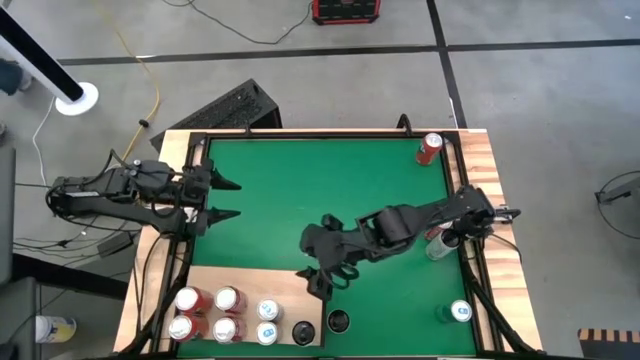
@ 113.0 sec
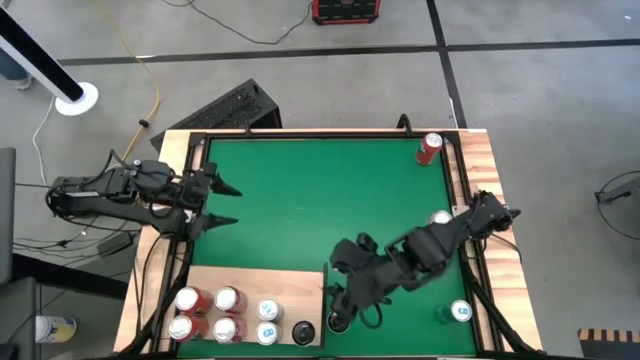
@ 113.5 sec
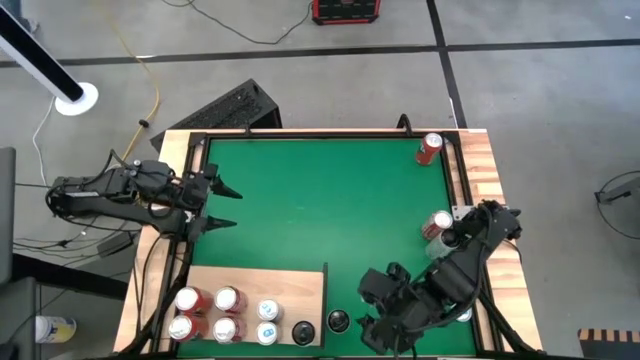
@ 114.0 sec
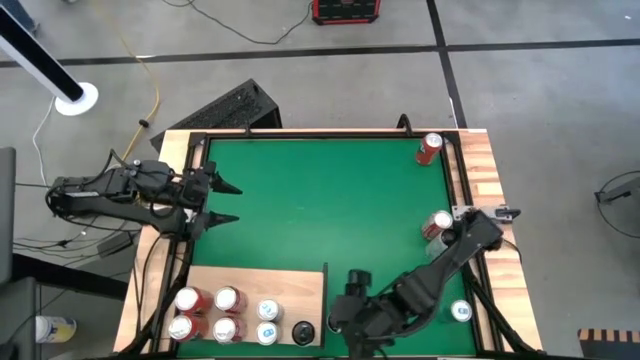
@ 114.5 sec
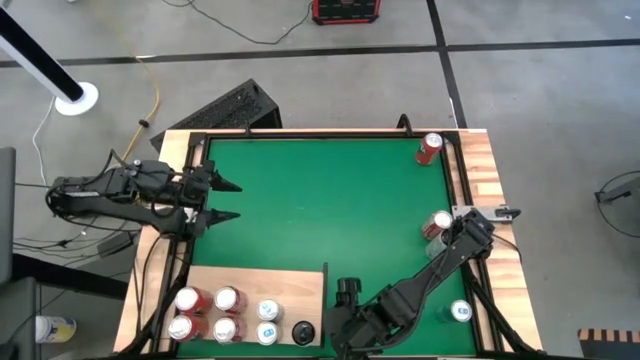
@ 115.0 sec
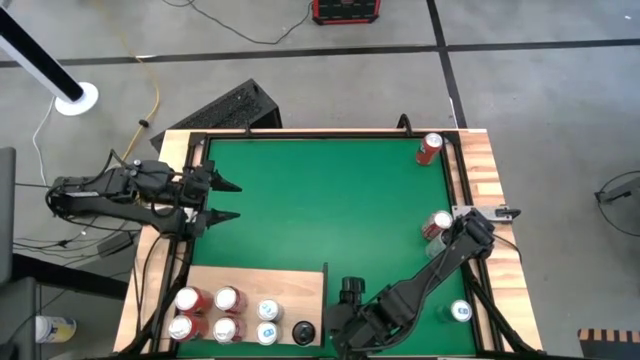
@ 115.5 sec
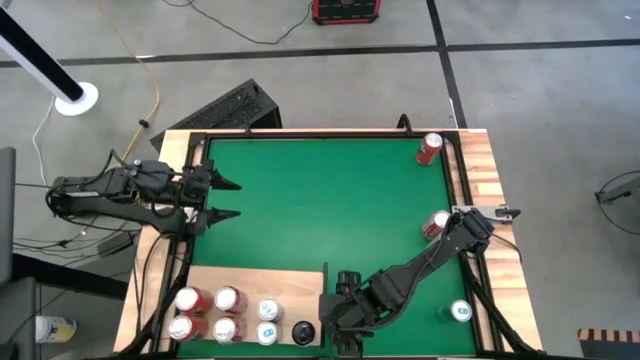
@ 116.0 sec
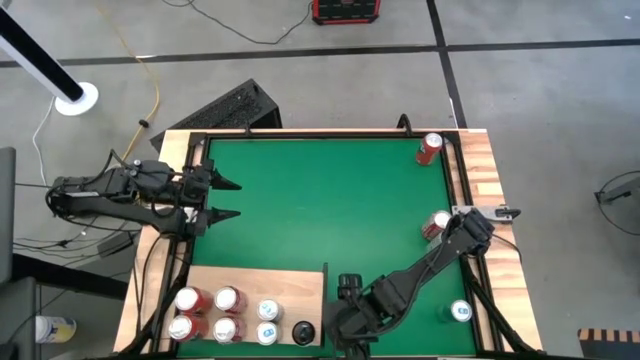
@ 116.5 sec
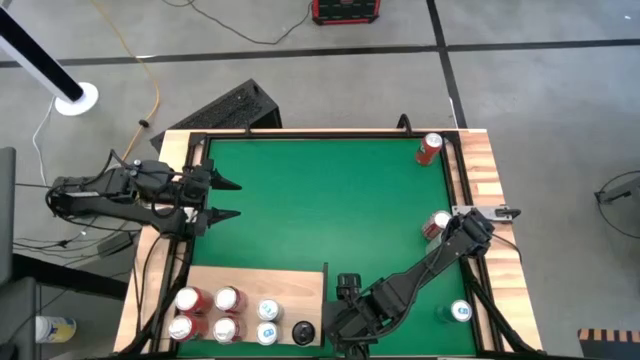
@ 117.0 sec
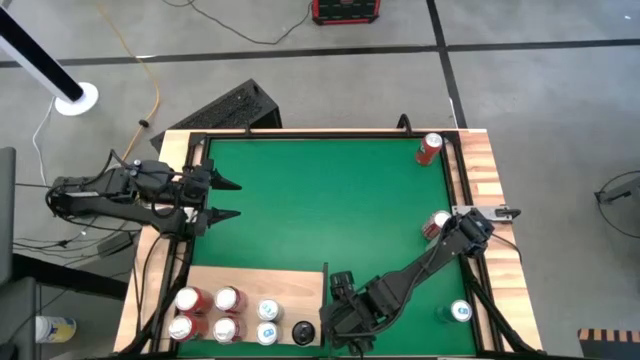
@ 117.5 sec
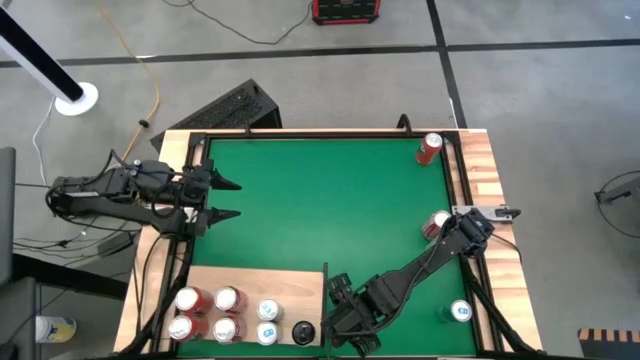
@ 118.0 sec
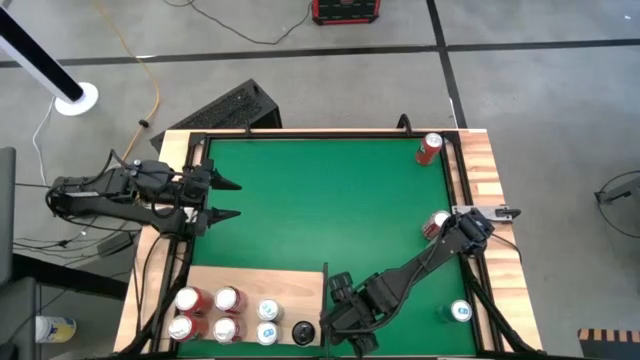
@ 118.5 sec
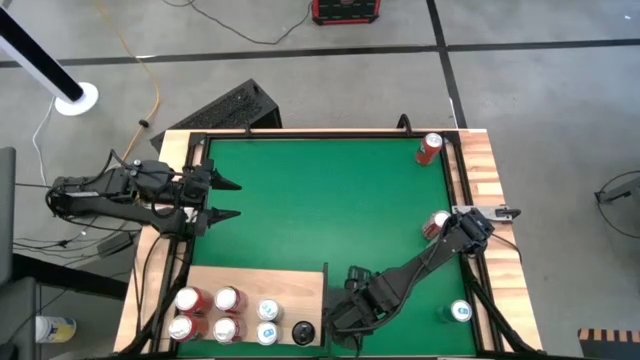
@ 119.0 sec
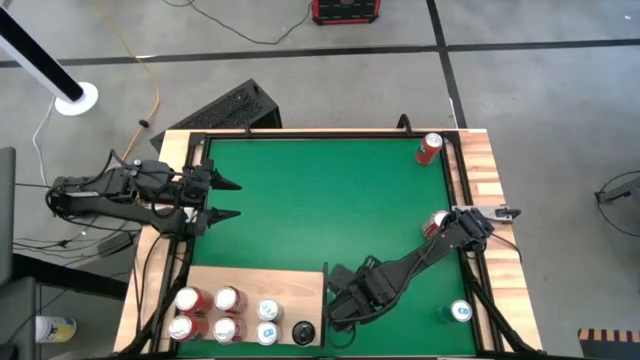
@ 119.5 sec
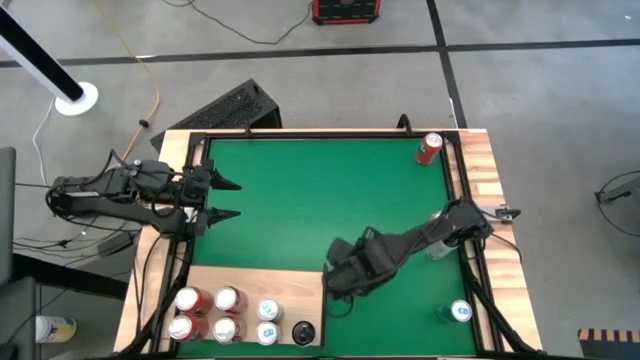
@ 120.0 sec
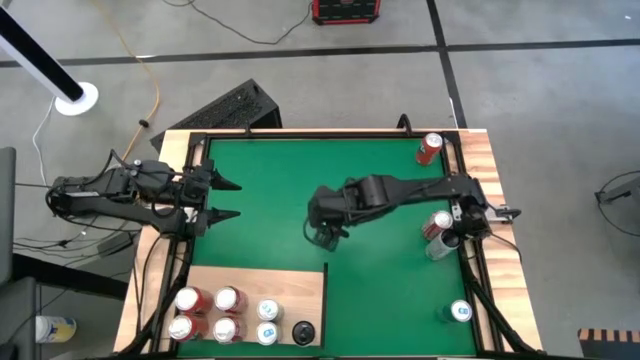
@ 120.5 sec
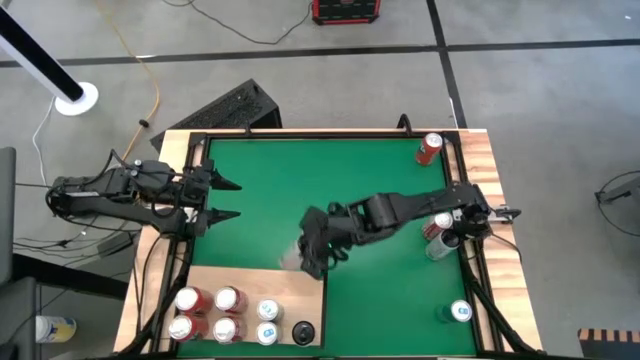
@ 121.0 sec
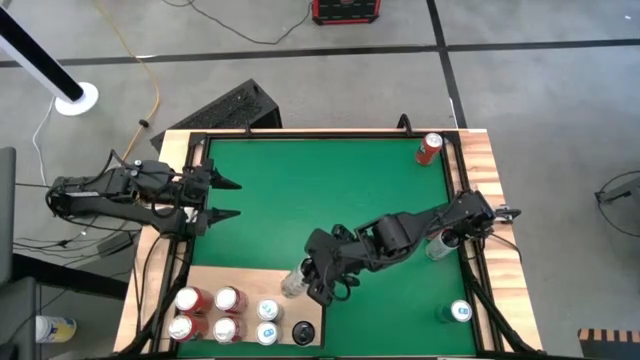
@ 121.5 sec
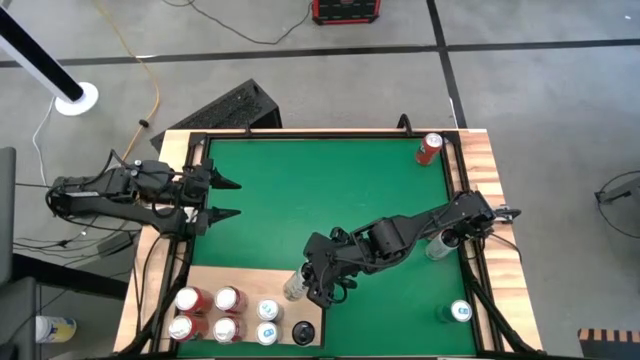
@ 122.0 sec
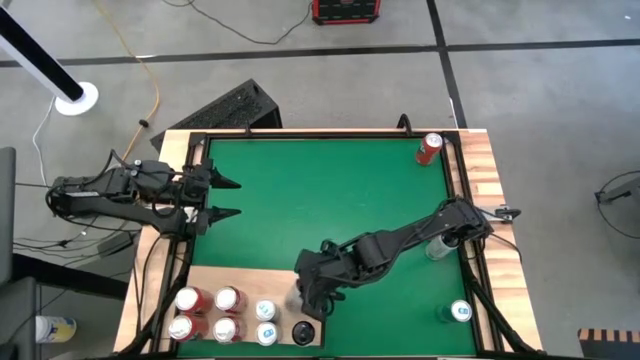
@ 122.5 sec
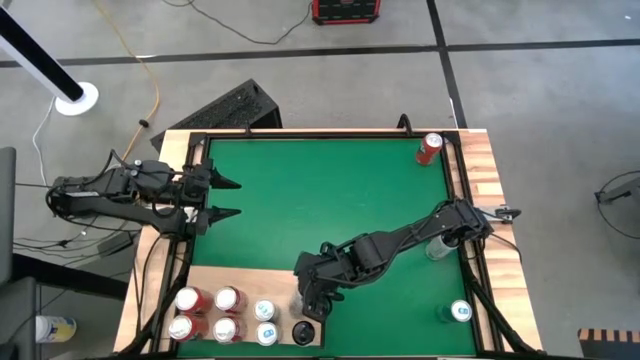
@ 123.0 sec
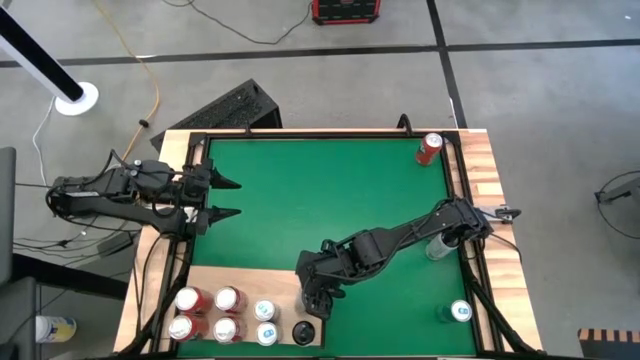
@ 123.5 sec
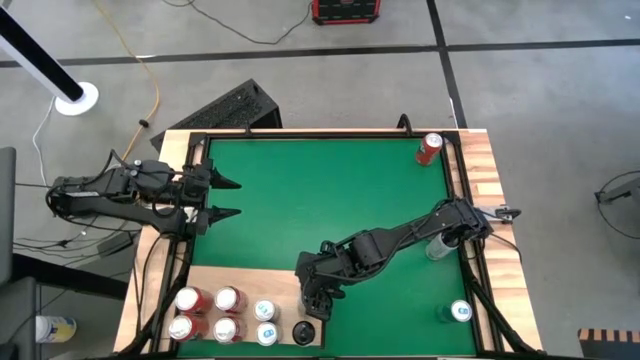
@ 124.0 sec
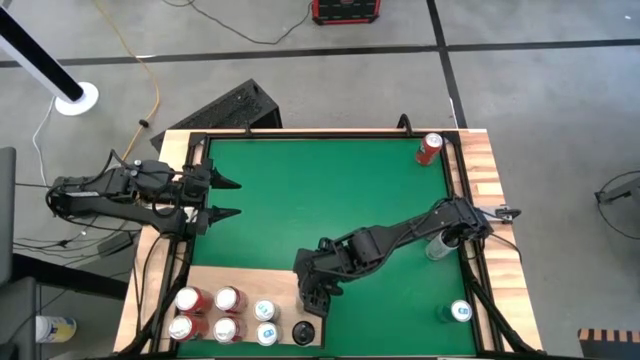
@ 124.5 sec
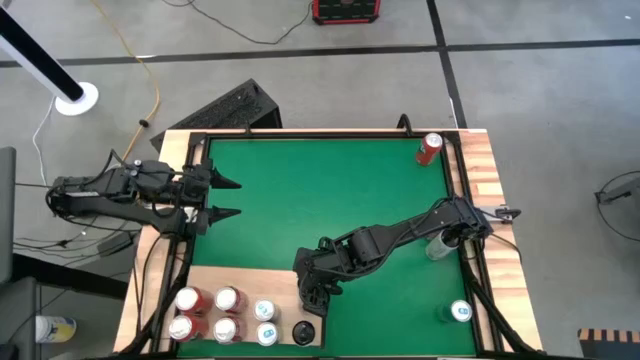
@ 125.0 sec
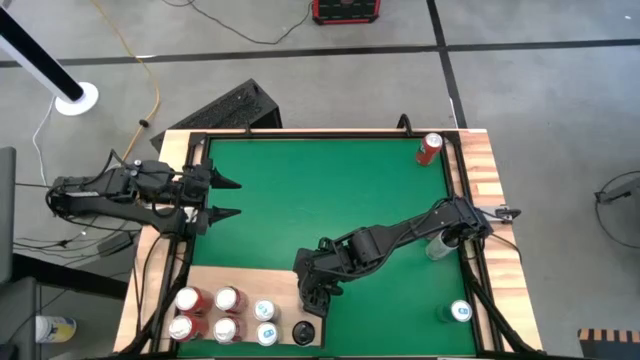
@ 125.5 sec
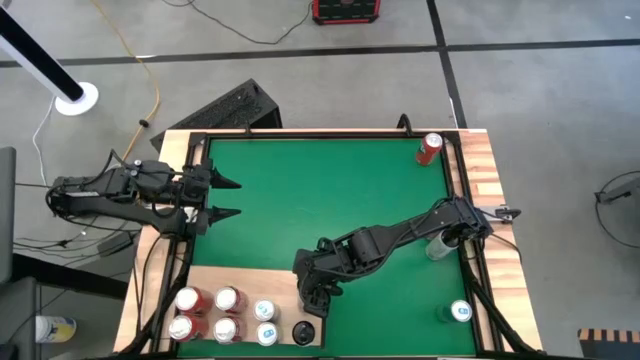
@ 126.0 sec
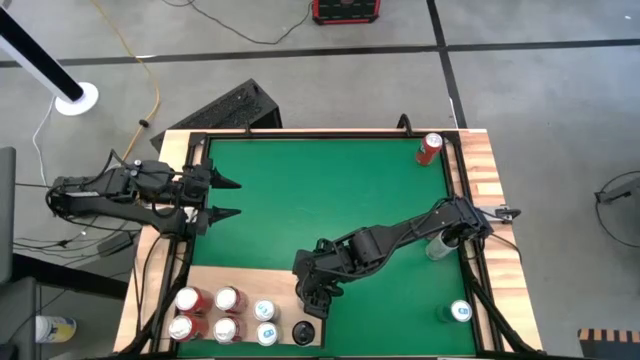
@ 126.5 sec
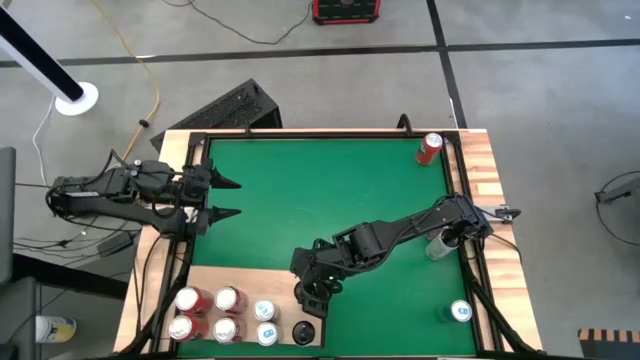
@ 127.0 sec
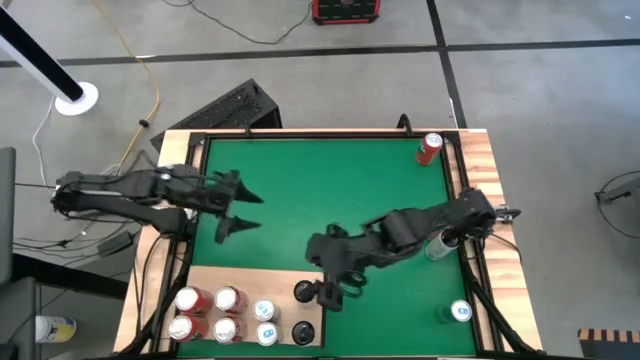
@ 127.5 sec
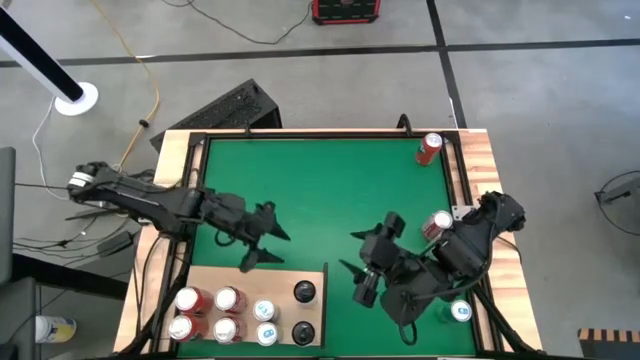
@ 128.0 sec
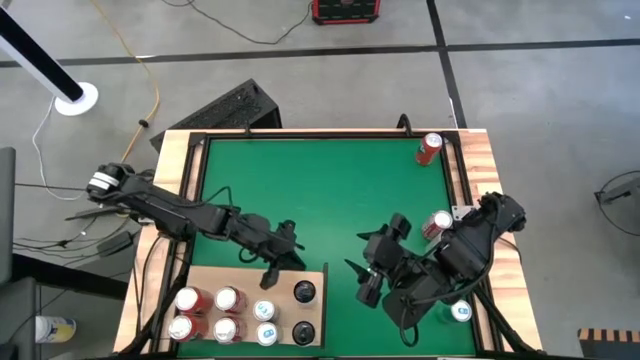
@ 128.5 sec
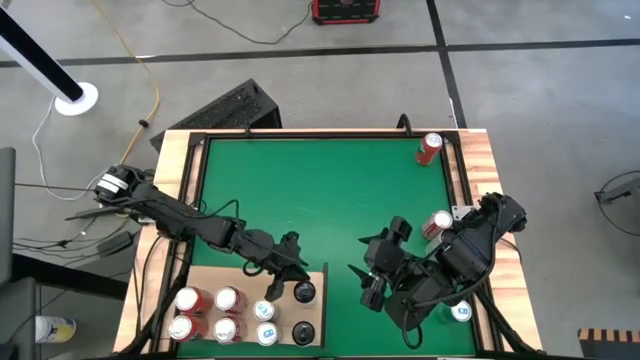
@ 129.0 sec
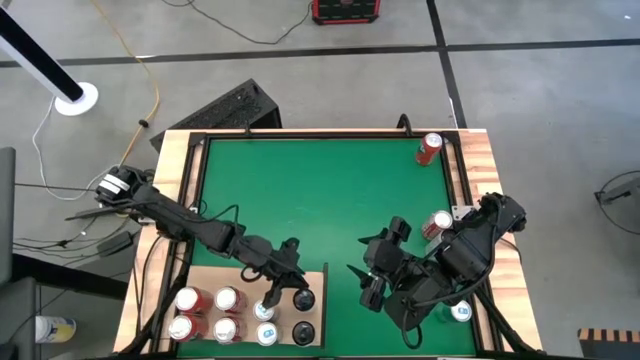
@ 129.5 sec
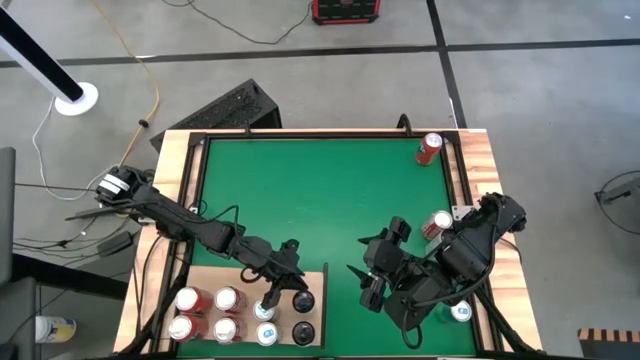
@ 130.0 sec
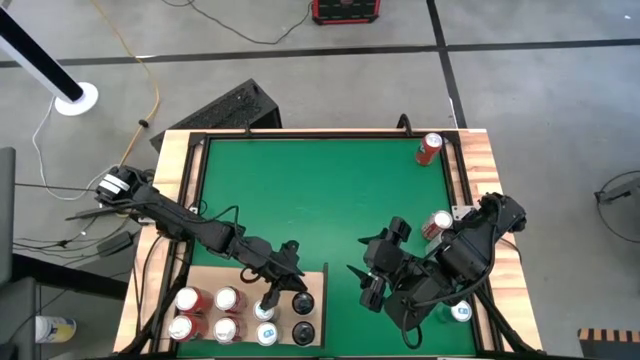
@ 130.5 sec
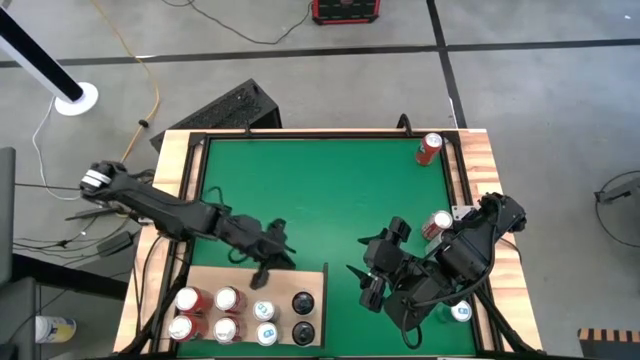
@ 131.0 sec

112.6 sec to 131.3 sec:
Task: Place canned beverage on shelf
Put the bottom left white yellow soda can on the shelf aligned with the other white yellow soda can

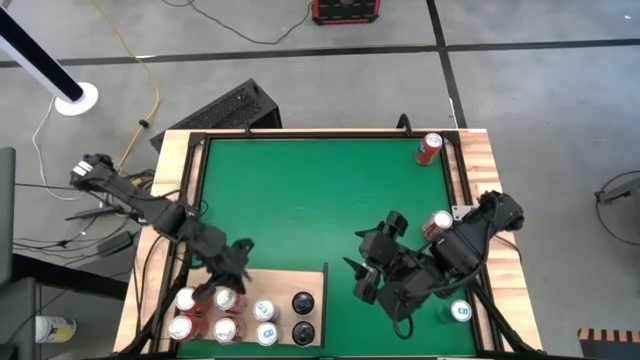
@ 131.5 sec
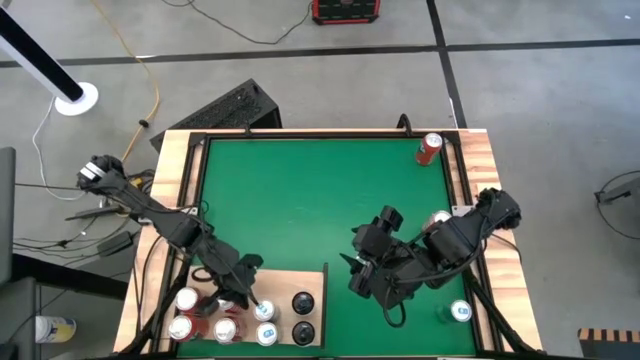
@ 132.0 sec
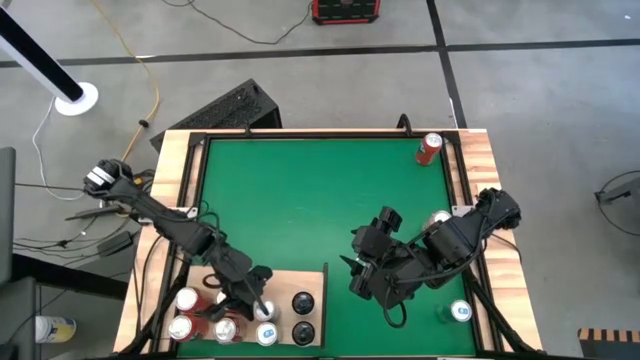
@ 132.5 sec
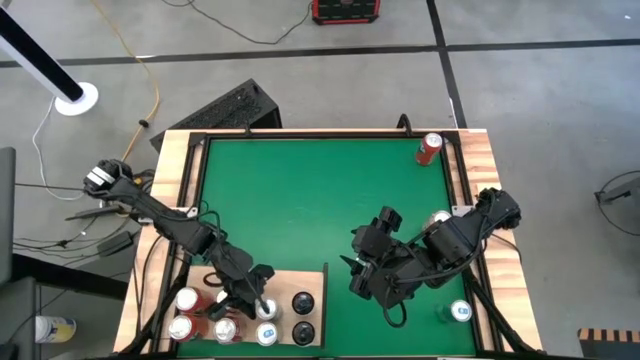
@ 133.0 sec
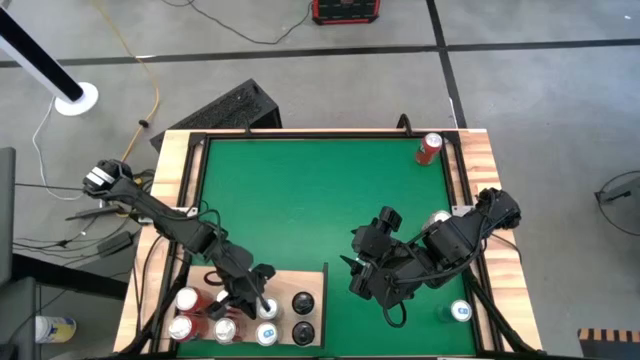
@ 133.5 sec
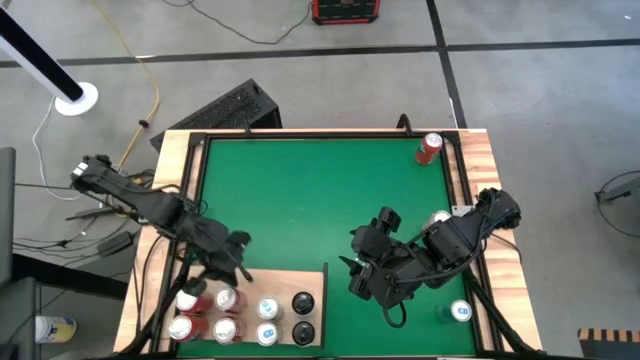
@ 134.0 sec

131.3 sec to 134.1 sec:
Adjust the blue soda can
